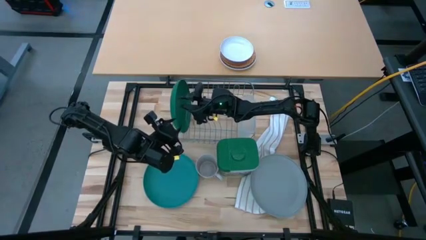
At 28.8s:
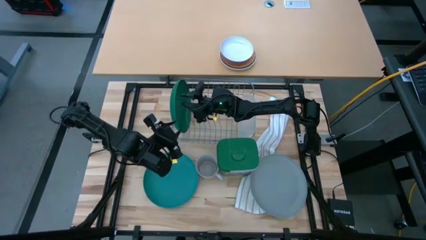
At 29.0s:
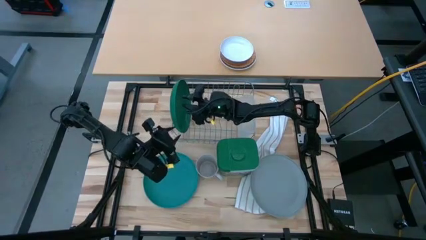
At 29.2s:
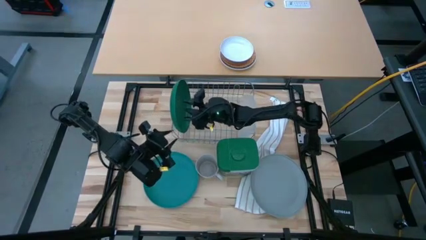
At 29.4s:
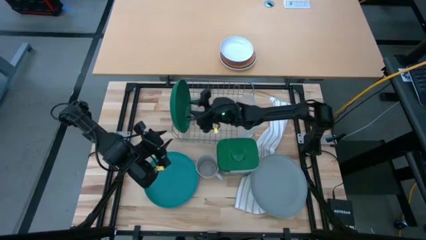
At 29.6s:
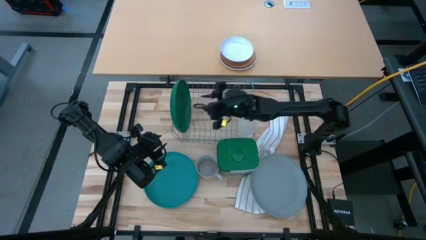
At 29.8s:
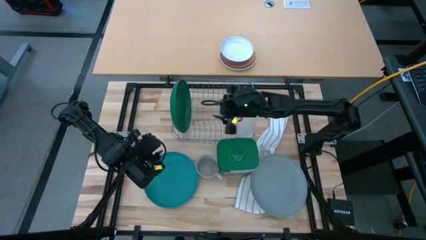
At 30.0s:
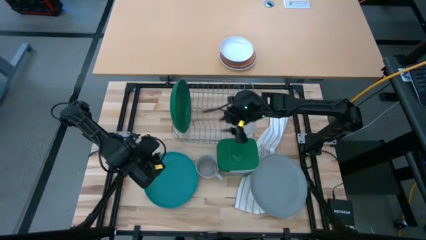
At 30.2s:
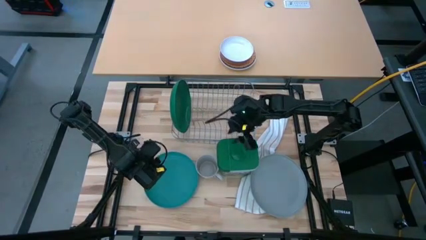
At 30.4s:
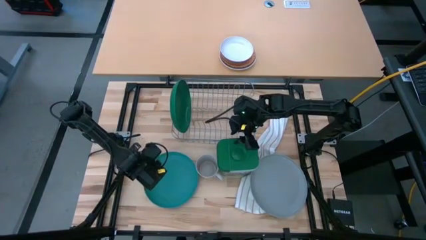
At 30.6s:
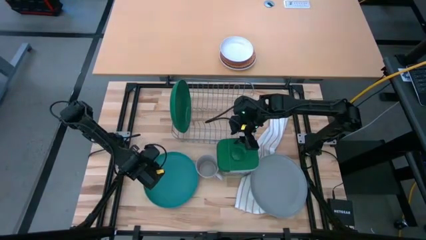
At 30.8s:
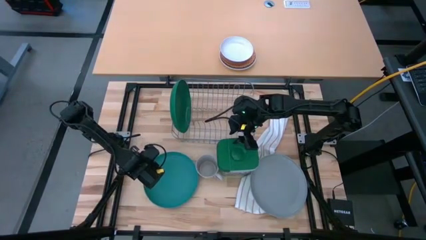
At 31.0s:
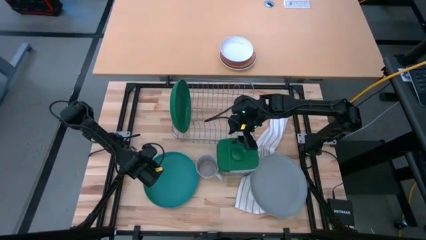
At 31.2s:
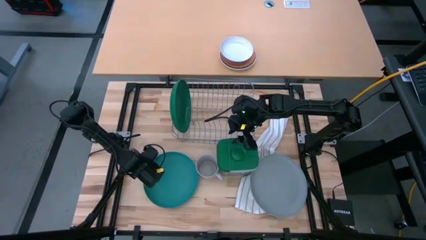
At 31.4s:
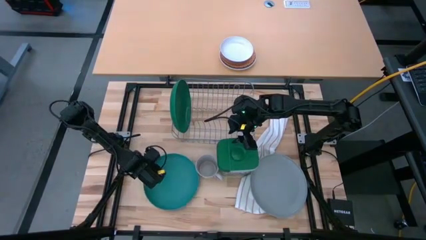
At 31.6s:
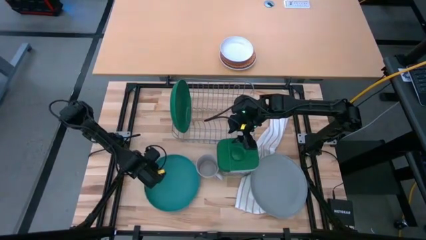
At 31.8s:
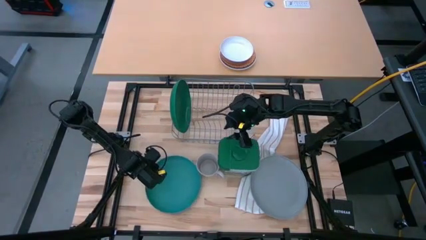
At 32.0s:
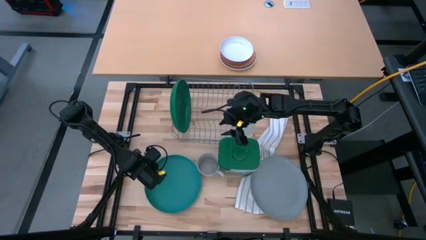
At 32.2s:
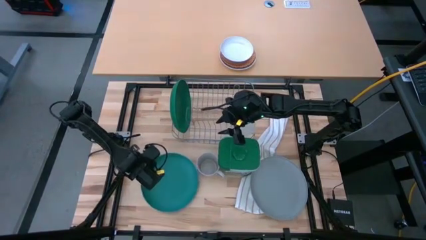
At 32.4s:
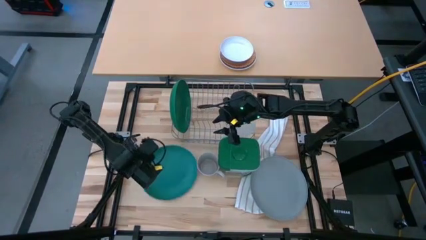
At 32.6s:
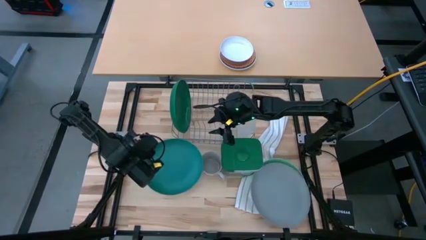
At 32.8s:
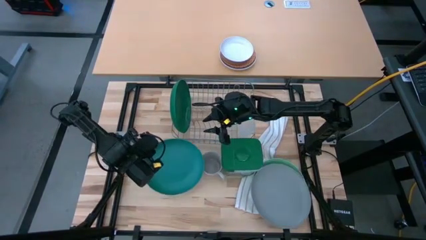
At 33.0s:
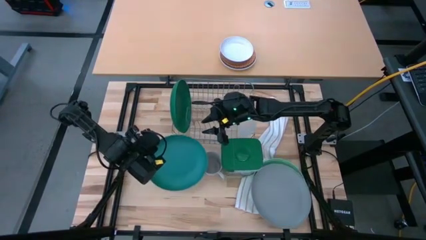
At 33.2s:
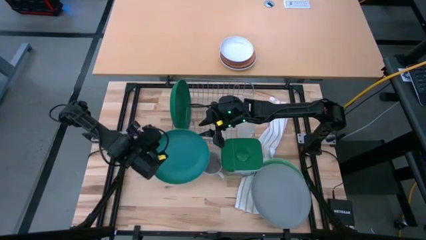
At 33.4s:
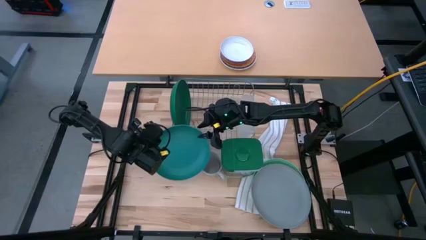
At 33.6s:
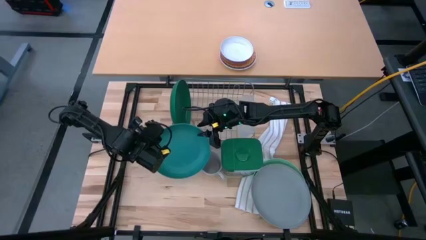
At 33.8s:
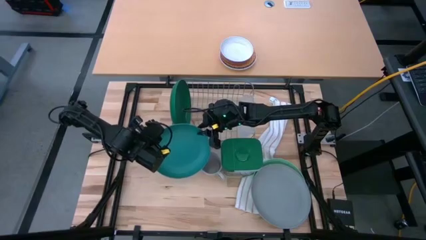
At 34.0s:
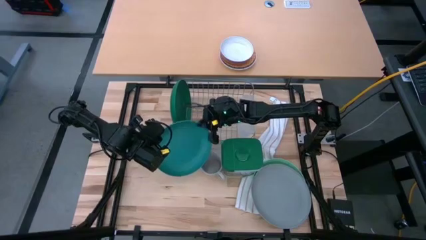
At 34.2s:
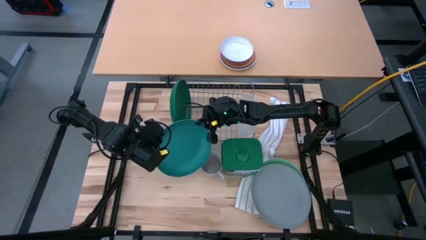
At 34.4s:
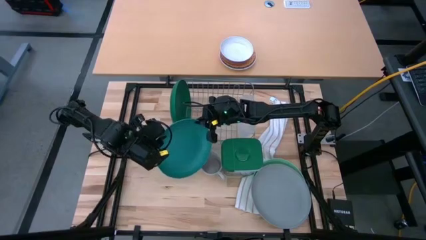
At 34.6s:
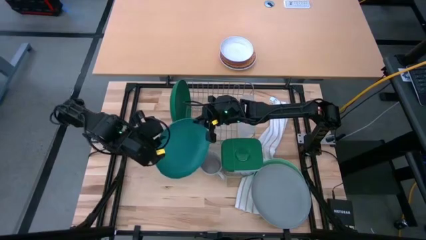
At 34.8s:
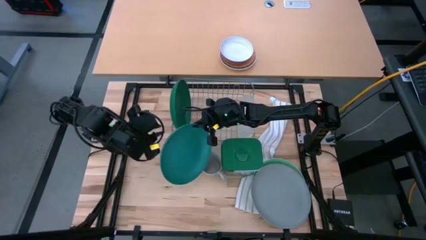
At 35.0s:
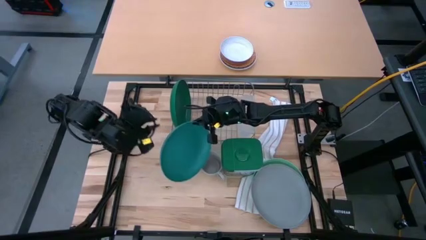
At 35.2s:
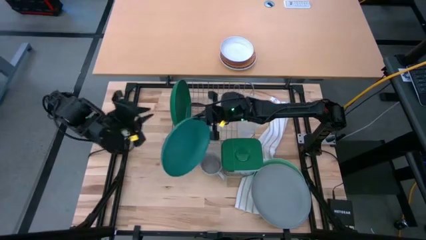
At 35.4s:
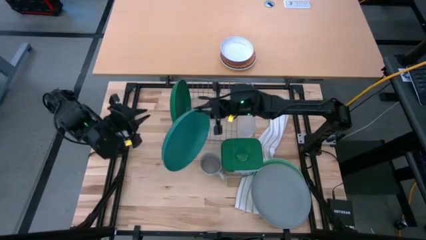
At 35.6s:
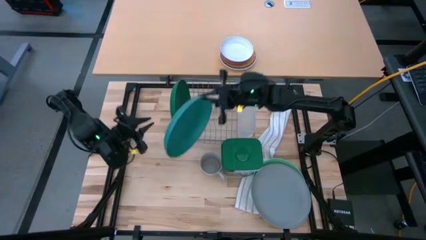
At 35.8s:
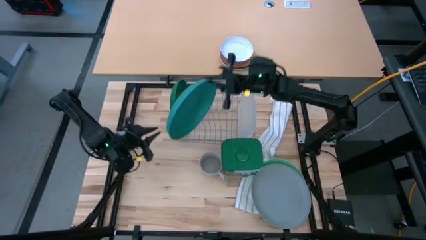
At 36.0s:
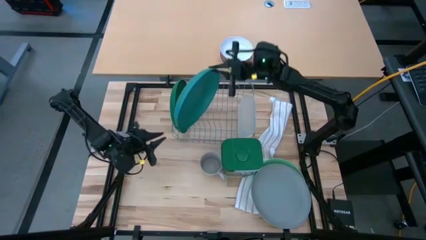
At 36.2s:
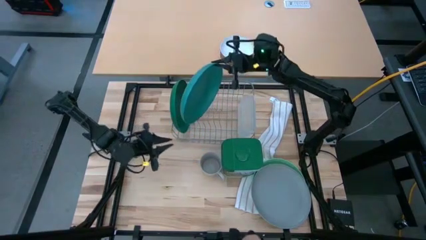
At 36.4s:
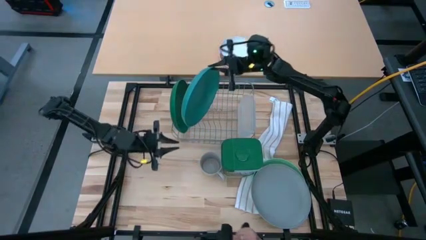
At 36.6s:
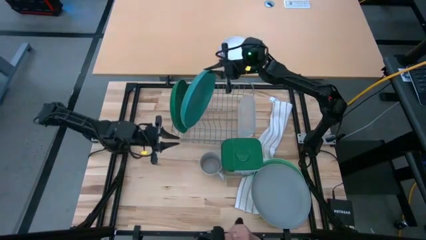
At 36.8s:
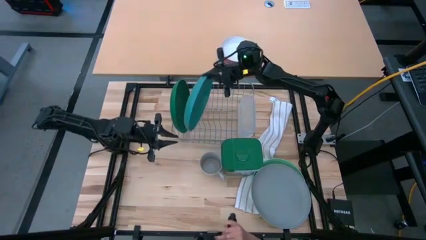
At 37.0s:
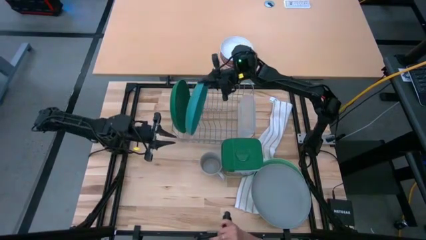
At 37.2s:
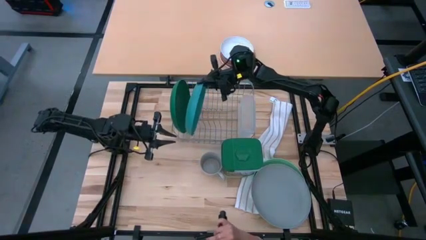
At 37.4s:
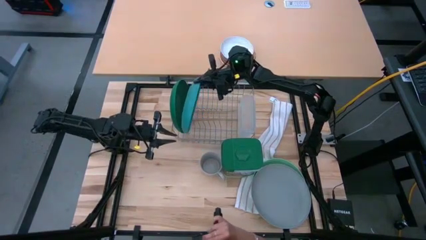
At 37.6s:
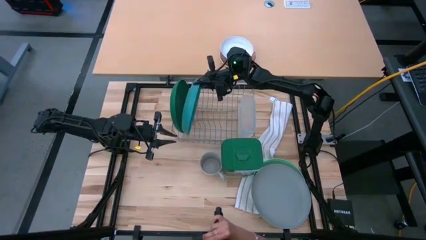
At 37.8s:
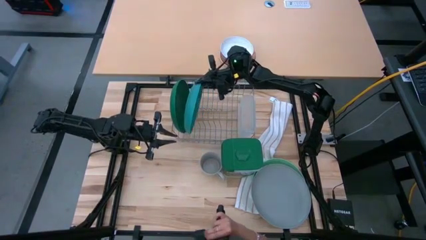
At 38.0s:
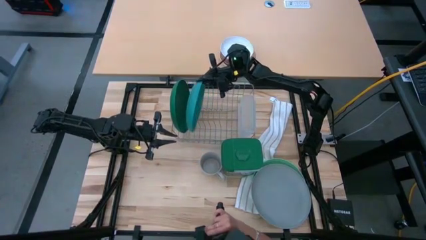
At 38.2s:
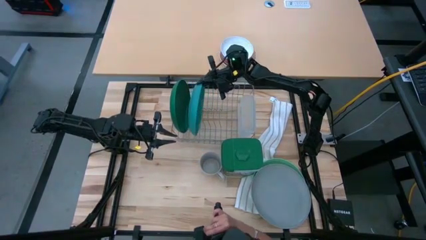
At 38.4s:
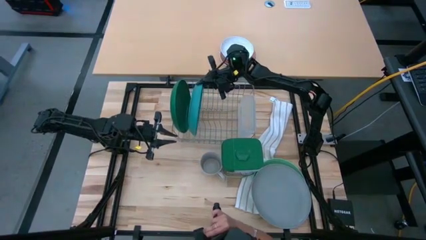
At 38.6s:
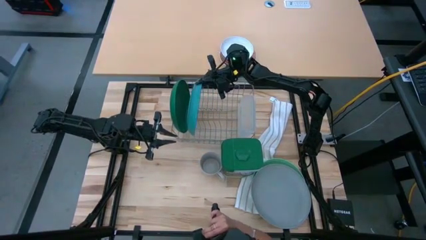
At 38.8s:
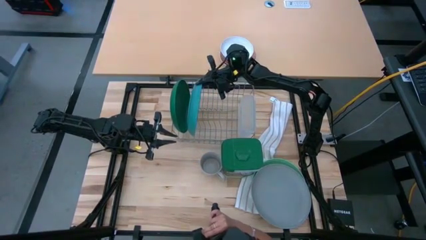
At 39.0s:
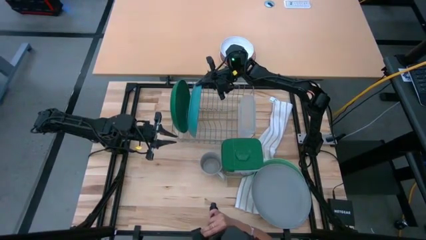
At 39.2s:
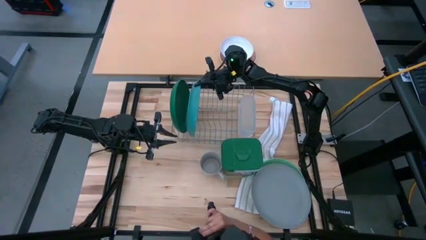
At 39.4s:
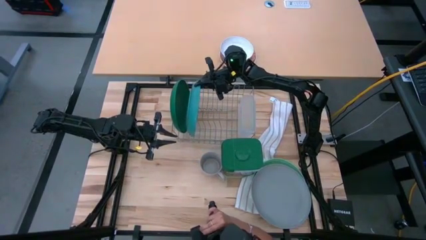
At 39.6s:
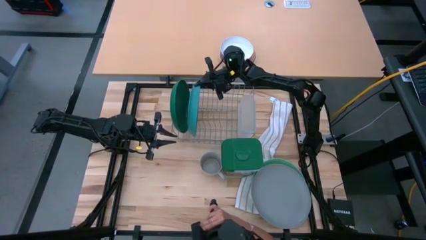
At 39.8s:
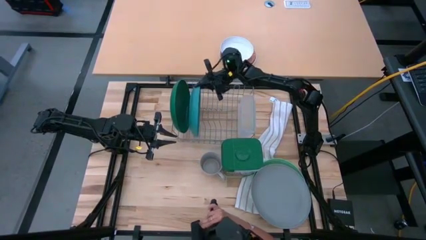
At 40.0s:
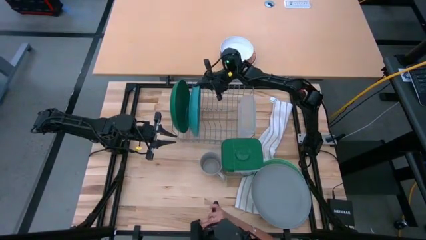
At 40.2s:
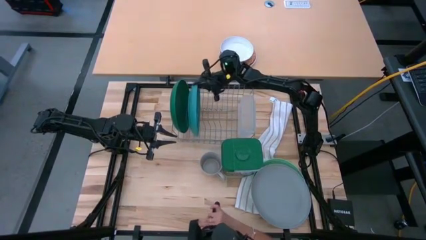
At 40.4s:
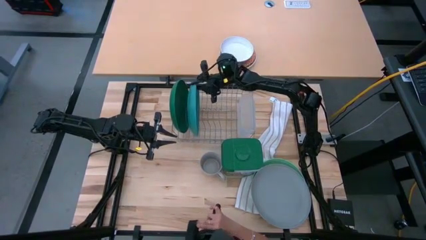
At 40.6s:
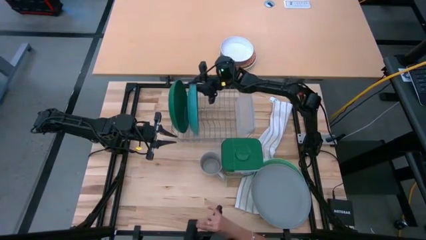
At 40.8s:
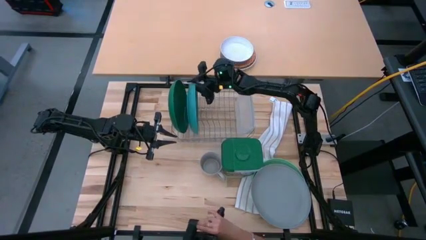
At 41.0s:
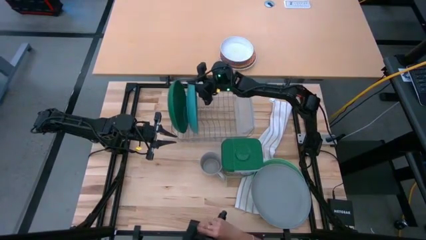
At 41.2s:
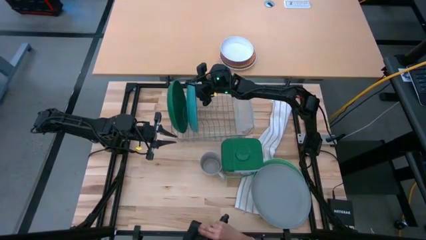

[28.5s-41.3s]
Task: Sort dishes
Put the blue plate in the dish rack

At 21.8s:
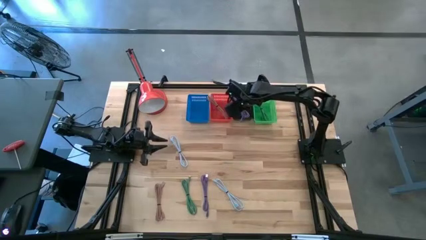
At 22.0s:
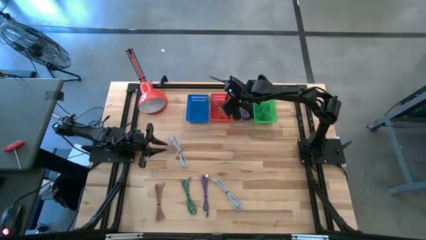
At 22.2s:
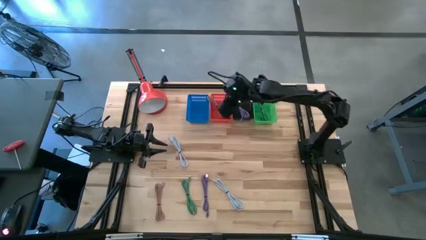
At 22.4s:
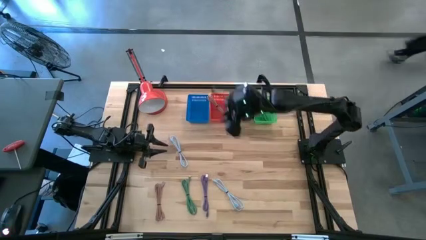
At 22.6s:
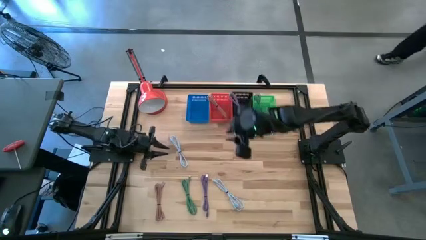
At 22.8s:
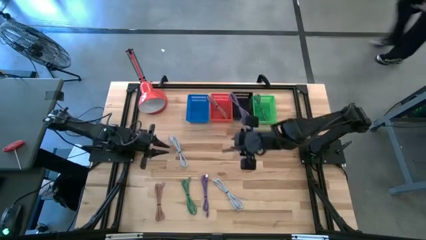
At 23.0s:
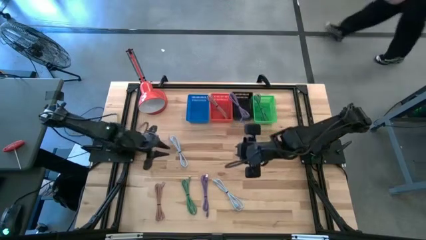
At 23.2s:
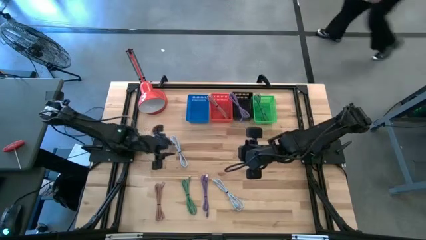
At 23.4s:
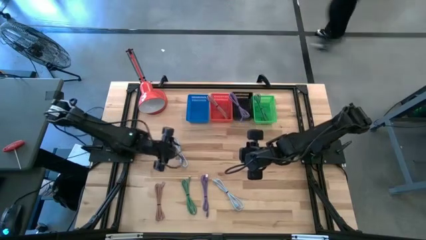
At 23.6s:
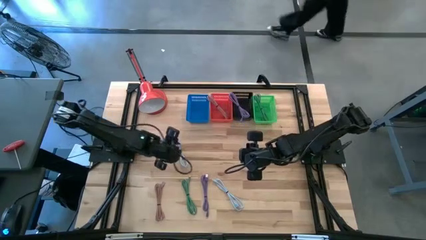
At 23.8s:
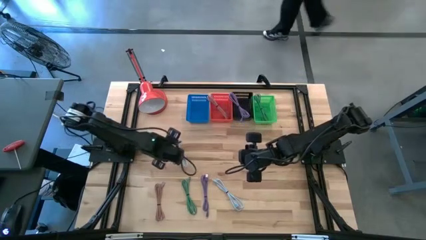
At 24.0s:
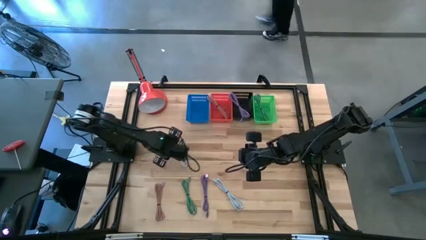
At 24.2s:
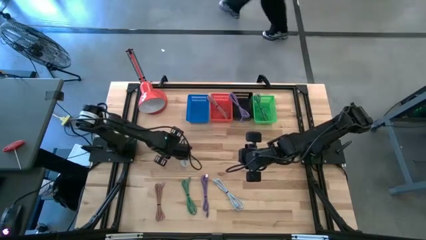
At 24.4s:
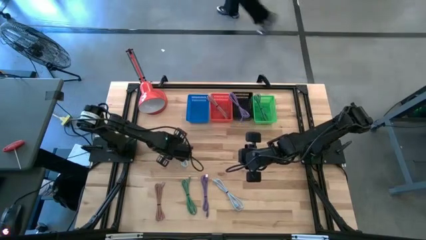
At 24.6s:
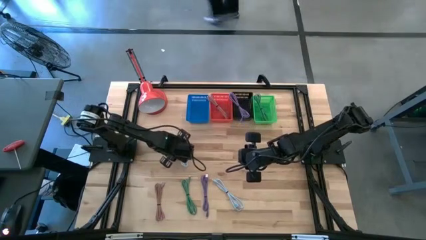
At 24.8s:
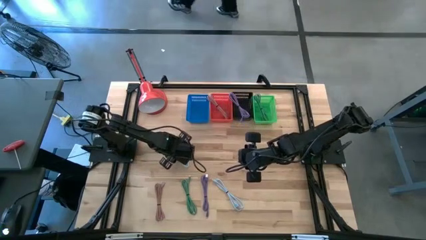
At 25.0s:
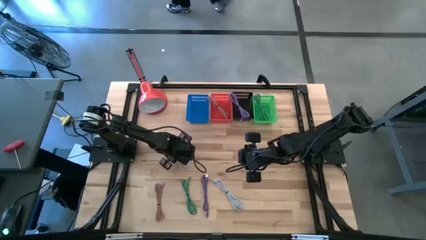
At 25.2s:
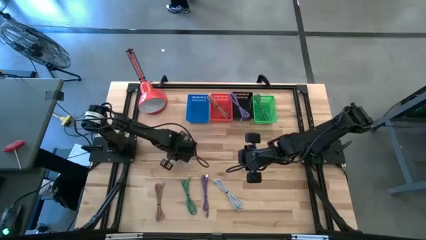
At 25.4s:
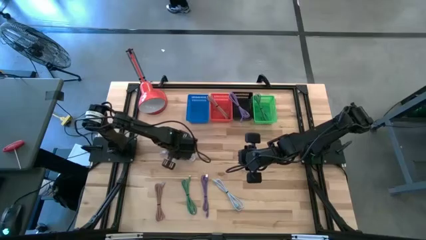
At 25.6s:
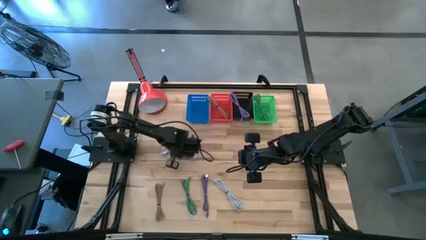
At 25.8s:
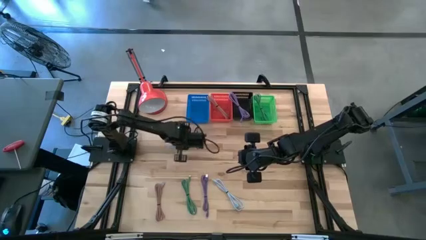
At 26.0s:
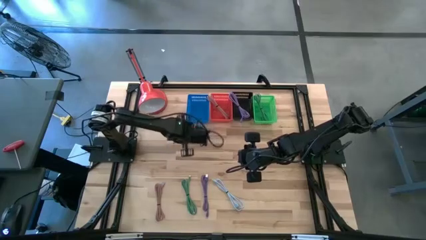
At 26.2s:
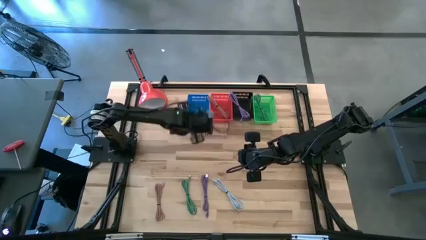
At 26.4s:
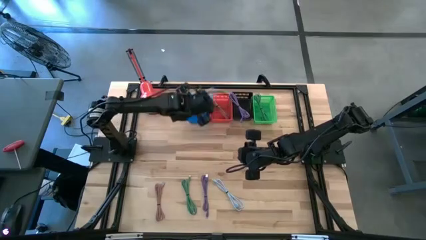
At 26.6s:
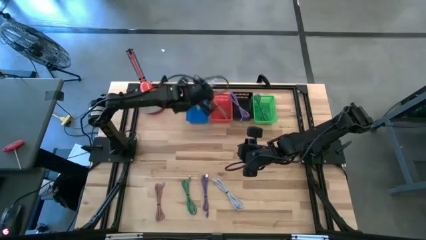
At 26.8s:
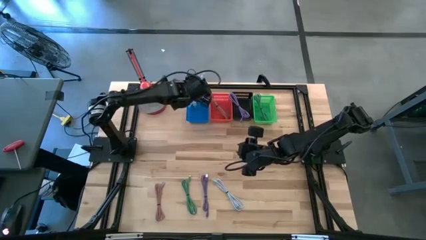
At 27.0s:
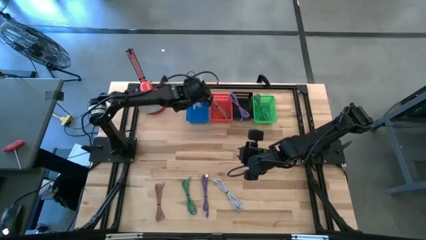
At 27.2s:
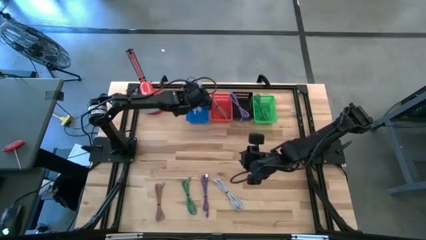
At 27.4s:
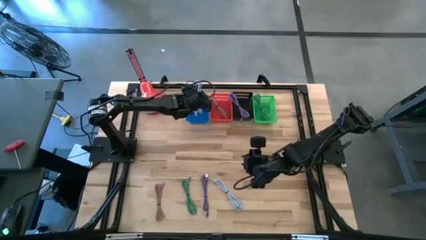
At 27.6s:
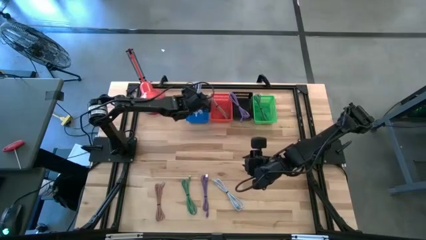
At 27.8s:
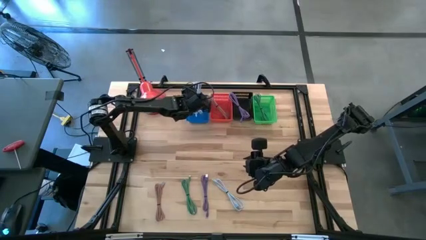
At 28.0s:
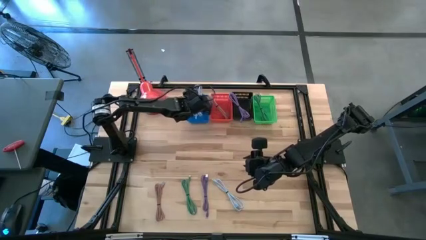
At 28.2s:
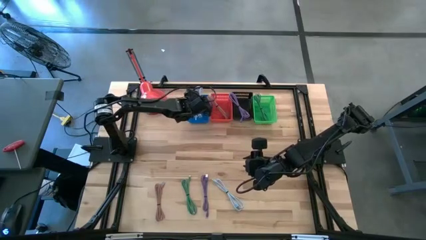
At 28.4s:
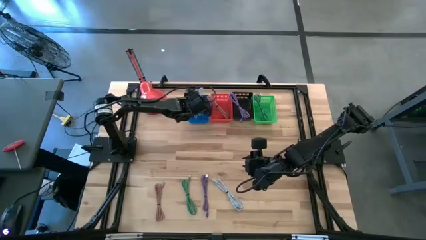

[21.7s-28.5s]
Task: Pick & Place USB Port
Put the left white charger cable into the blue bin
